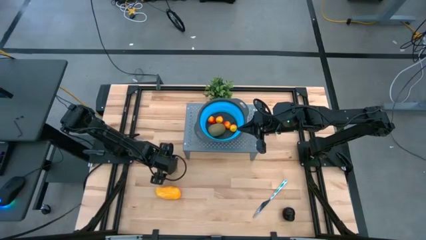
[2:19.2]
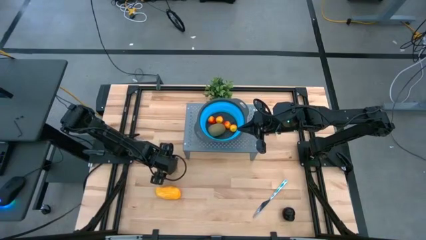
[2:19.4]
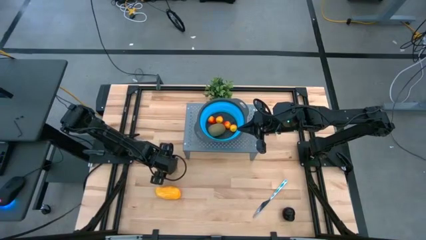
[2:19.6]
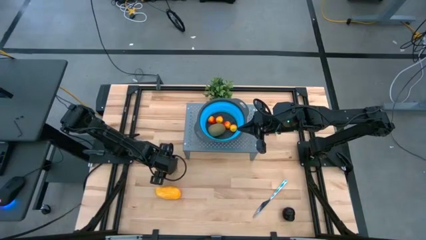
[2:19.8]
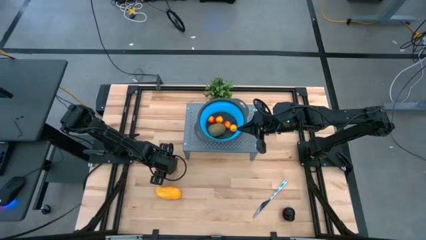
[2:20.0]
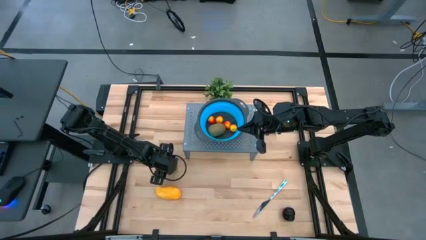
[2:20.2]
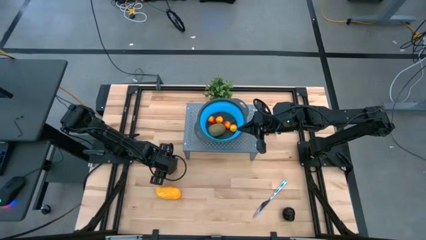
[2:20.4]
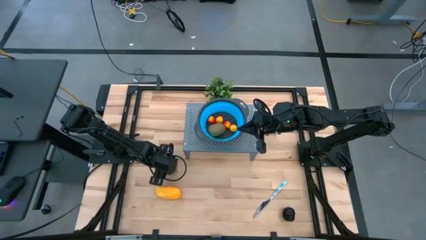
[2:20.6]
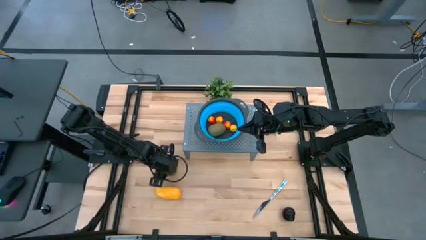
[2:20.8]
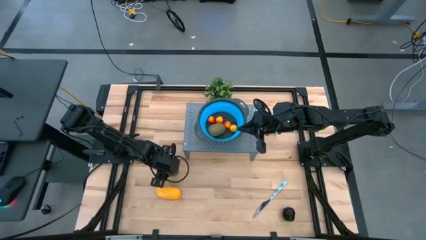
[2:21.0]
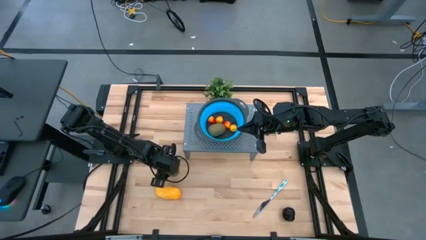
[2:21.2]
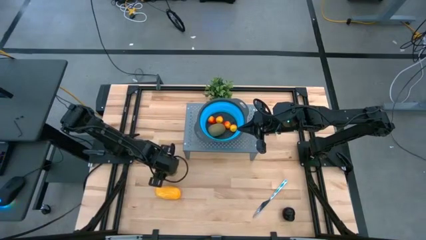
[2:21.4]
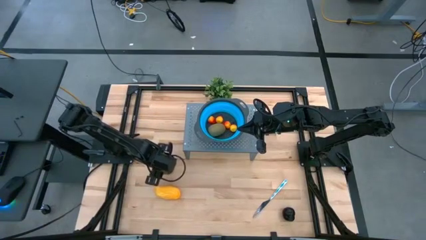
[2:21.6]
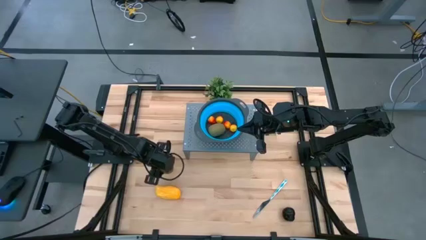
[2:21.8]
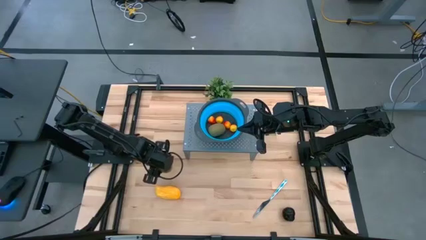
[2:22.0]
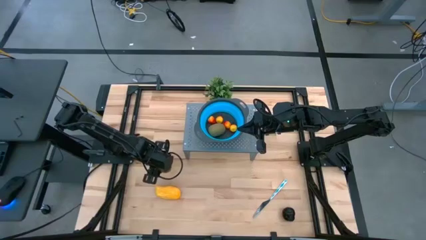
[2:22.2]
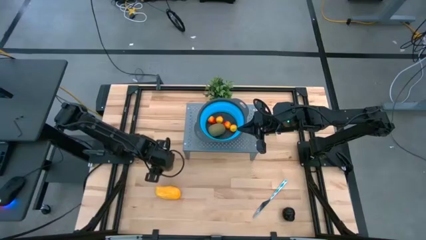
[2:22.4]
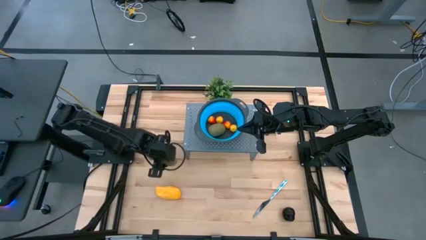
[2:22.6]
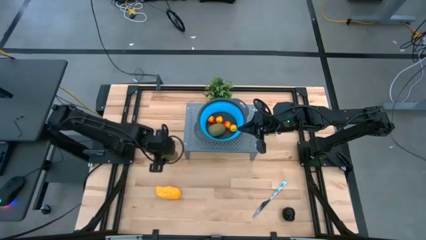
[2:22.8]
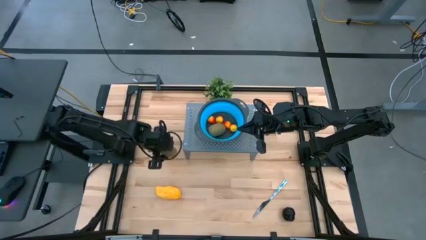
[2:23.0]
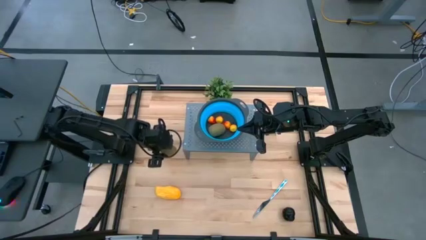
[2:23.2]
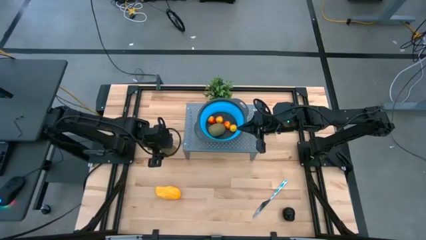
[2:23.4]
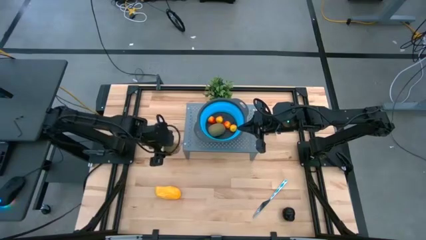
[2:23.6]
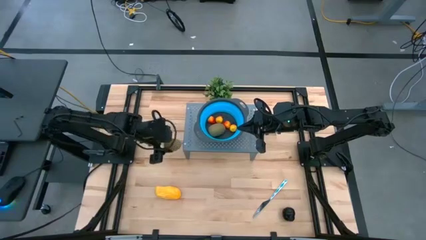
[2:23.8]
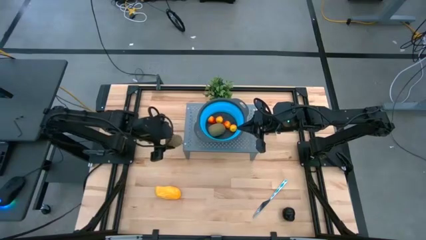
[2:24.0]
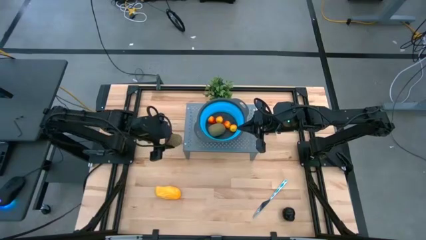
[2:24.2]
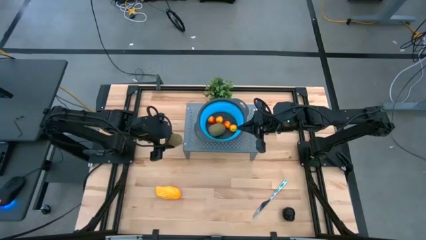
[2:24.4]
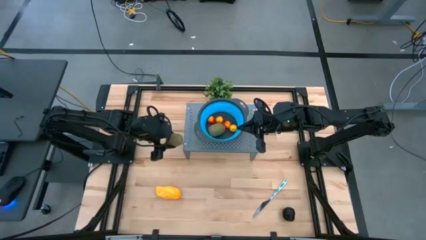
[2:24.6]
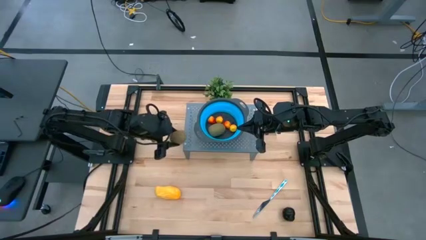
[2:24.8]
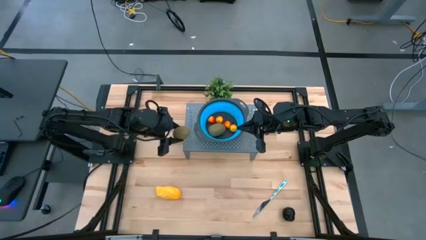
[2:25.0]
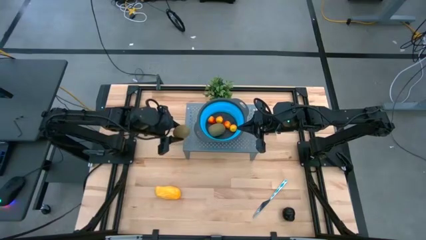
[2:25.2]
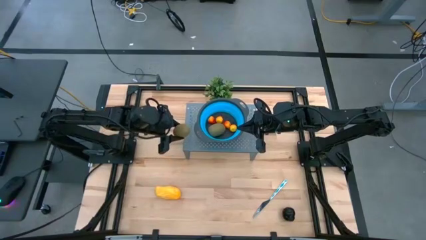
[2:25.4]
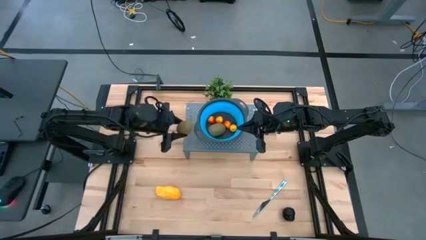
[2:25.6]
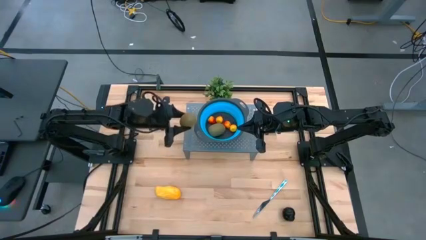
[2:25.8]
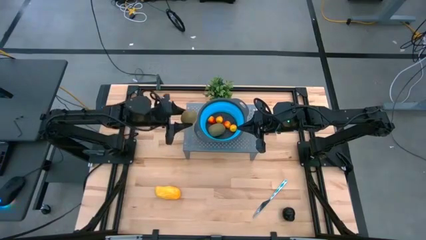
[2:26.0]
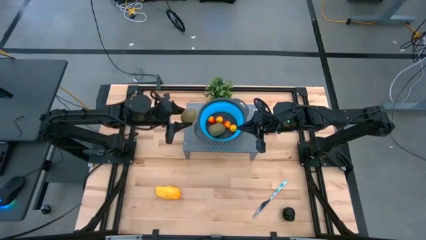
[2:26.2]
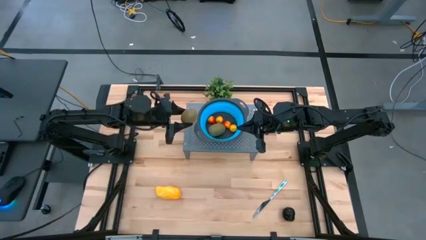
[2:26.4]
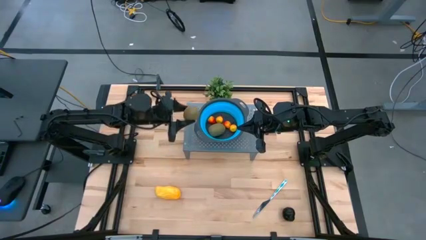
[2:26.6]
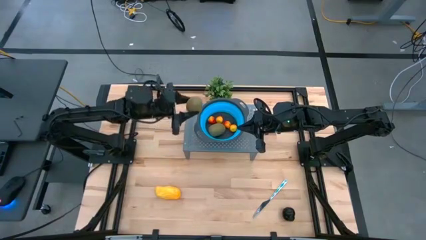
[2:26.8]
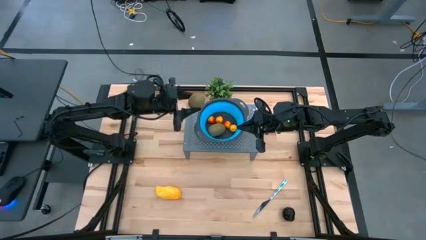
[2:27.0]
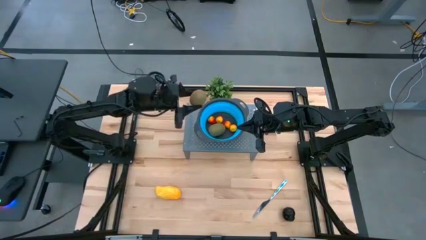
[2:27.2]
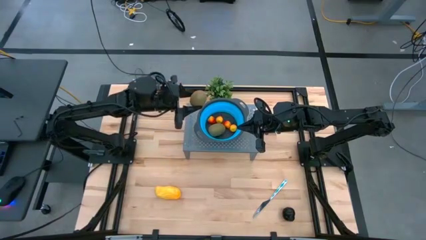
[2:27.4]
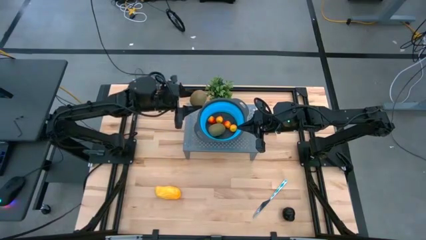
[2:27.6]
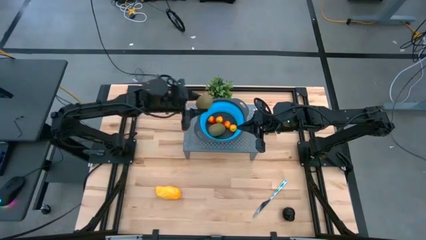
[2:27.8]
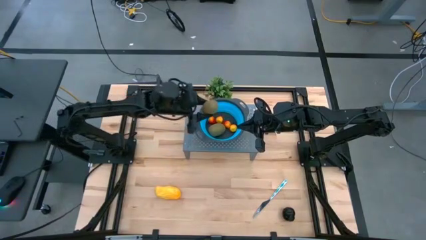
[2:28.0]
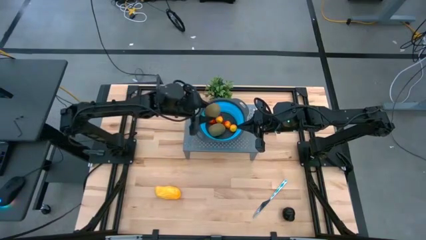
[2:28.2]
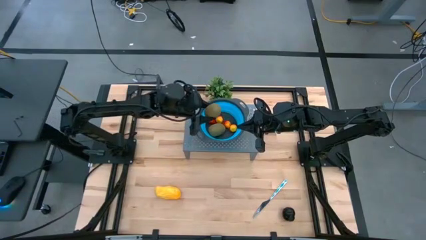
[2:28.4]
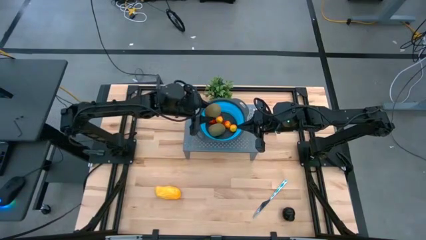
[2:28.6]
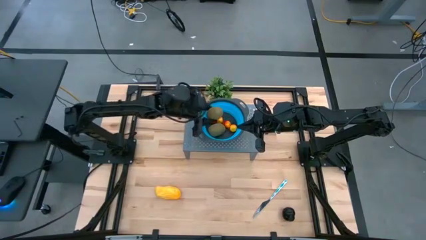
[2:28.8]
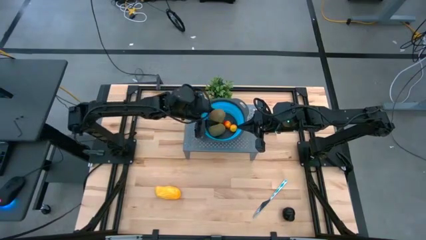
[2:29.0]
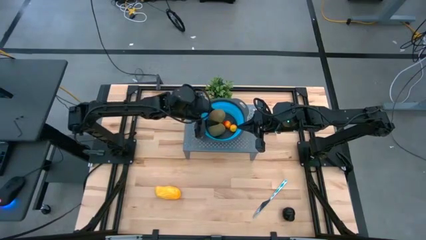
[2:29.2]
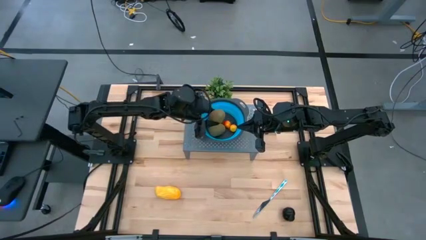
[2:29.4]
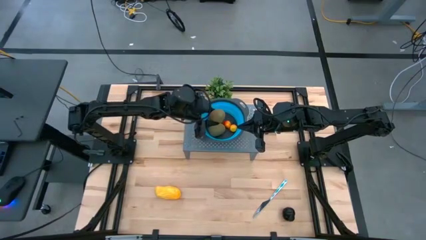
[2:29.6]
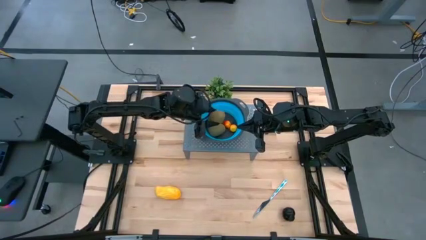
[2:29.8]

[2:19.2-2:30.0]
Task: Pick & Place Fruit
Put the green kiwi into the strainer bowl on the shelf

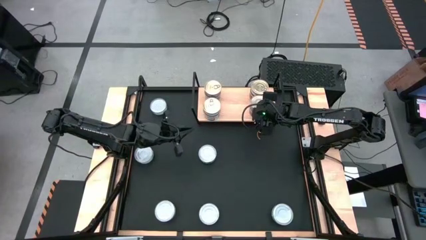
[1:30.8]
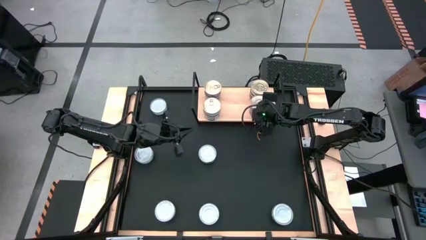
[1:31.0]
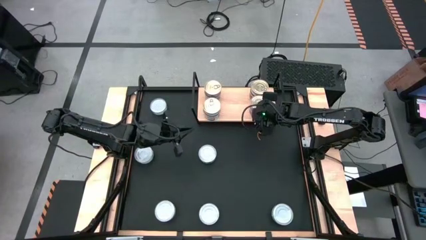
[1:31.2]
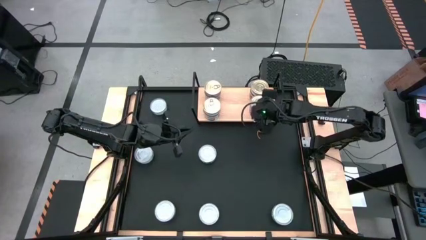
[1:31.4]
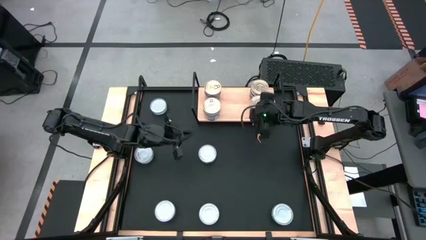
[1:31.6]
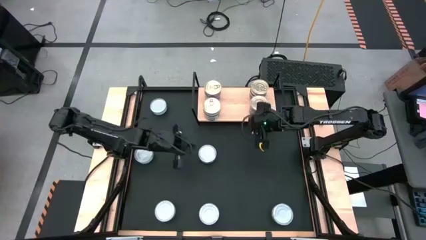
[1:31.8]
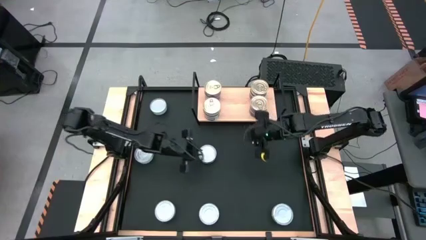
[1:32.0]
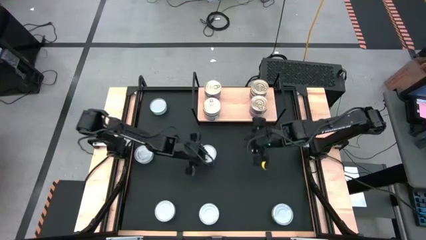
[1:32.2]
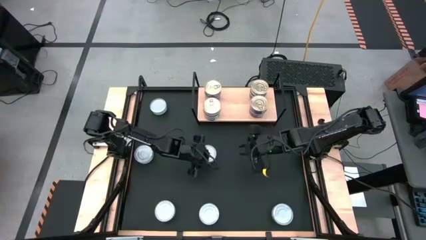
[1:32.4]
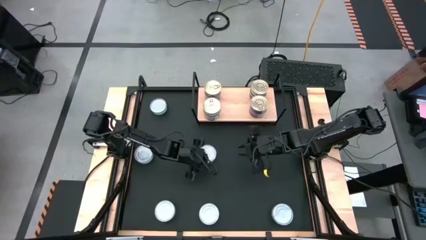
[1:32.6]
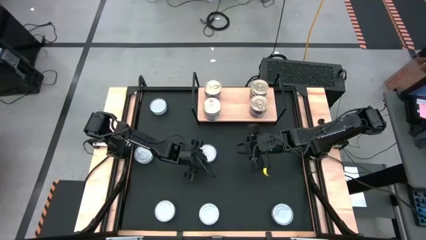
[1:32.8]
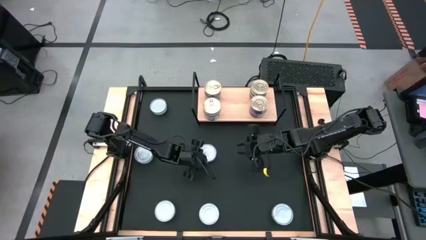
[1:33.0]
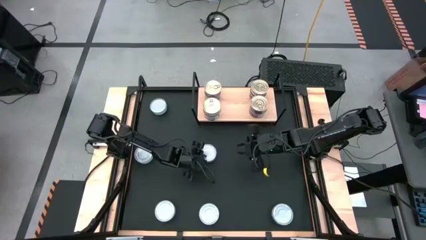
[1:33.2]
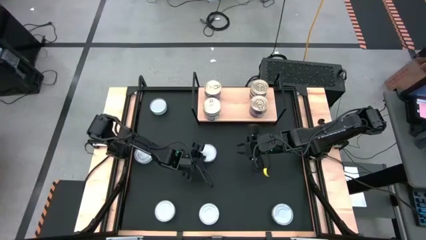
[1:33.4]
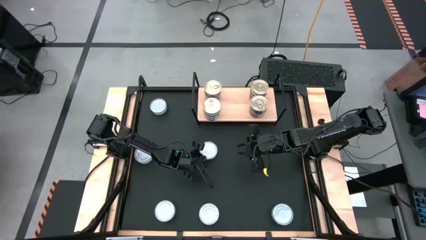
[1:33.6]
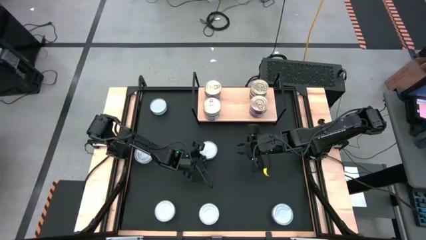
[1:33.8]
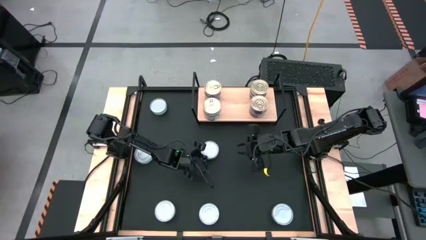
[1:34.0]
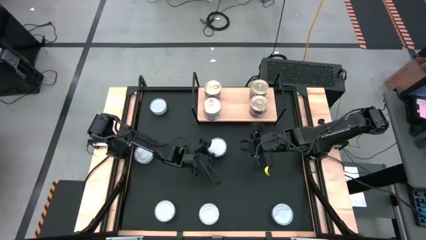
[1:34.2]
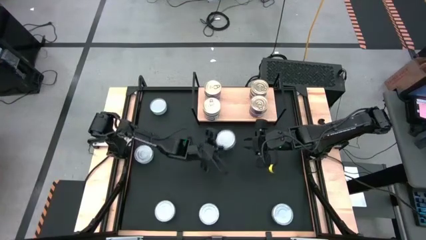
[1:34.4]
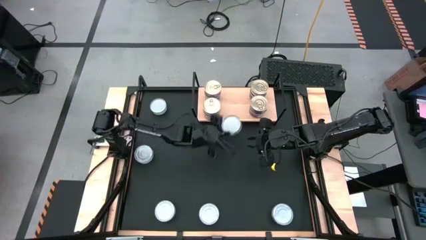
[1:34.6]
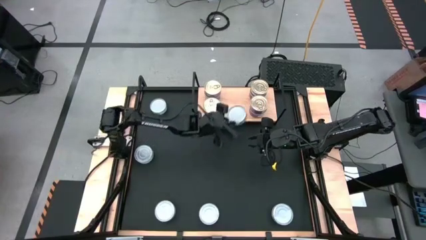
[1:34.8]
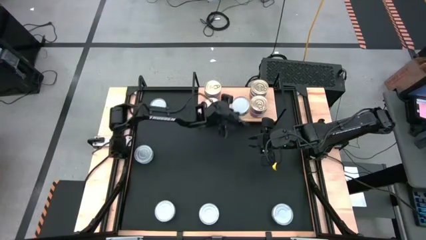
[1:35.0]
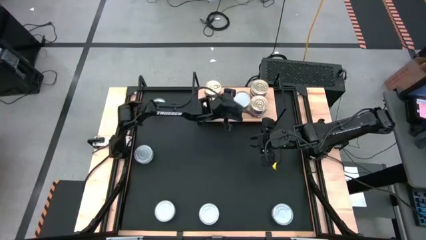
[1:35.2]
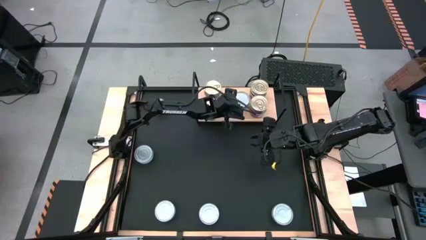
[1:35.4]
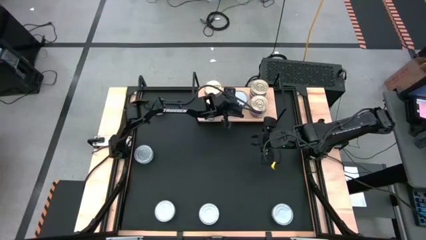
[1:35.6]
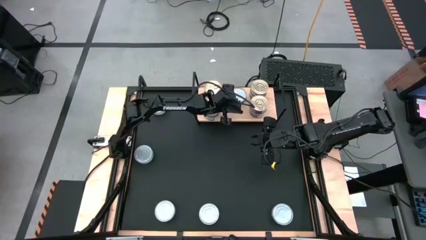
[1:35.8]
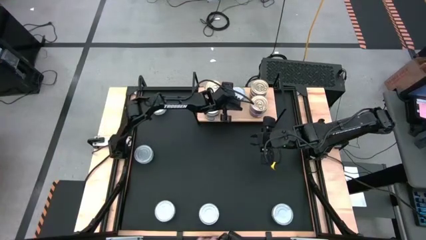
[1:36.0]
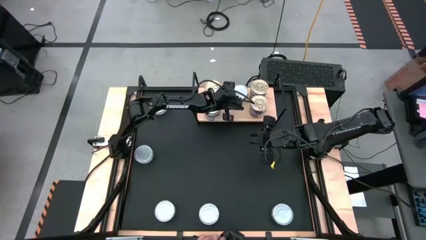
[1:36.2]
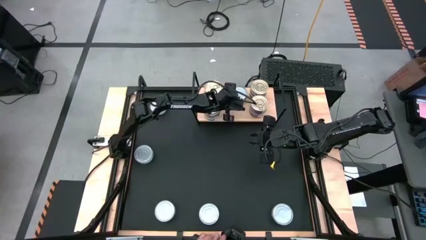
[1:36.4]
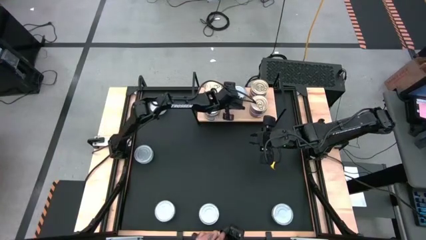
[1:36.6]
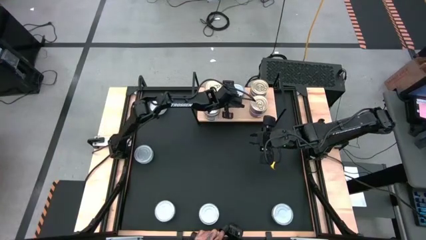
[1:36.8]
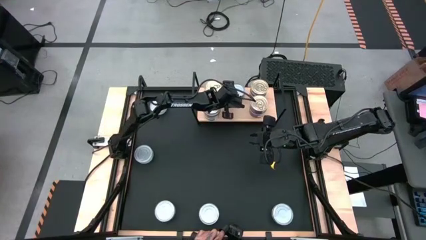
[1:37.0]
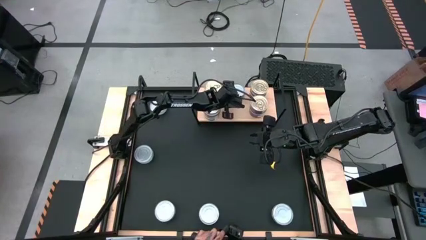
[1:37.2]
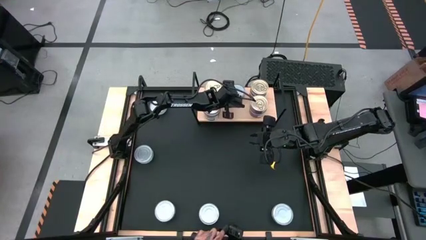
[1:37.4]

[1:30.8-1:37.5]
Task: Stack canned seafood by type on shelf
Put the green tuna can on the shelf
